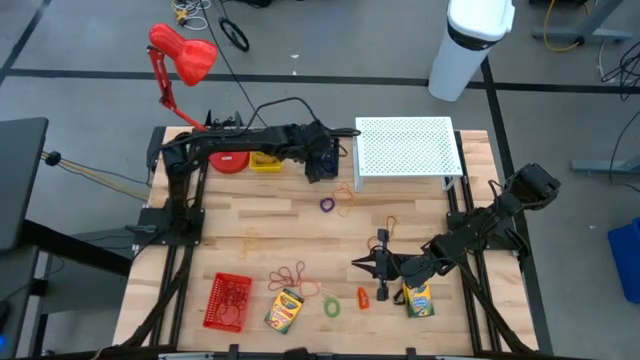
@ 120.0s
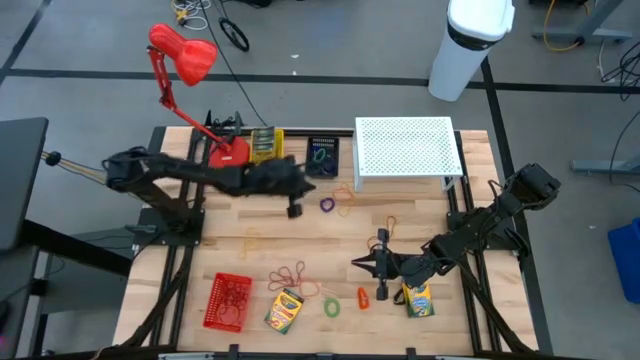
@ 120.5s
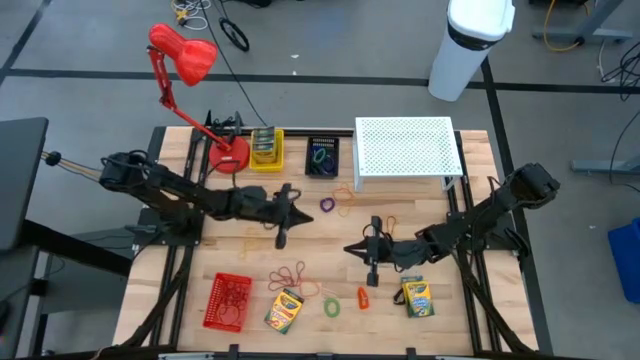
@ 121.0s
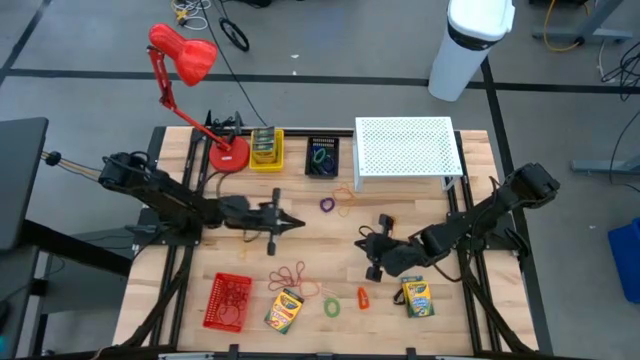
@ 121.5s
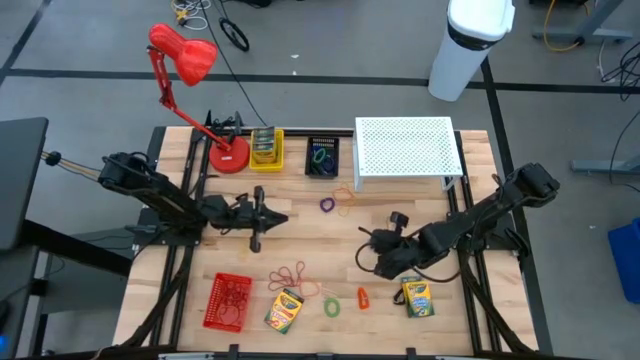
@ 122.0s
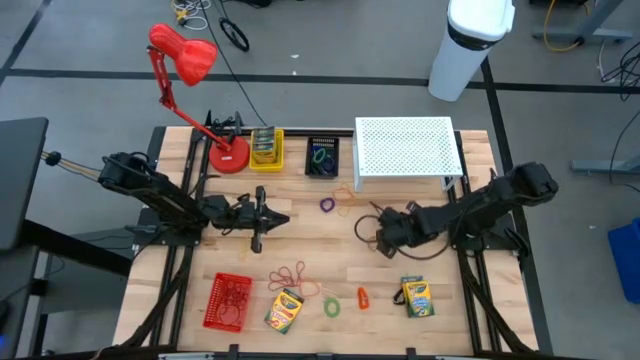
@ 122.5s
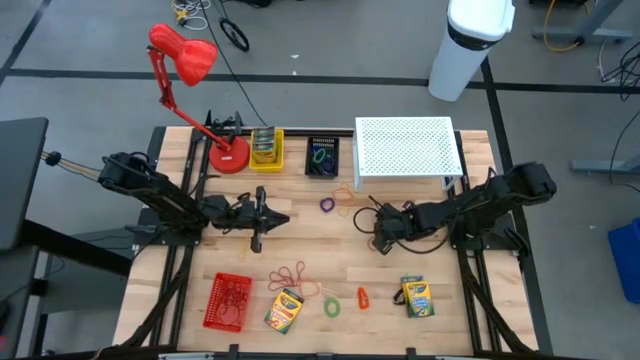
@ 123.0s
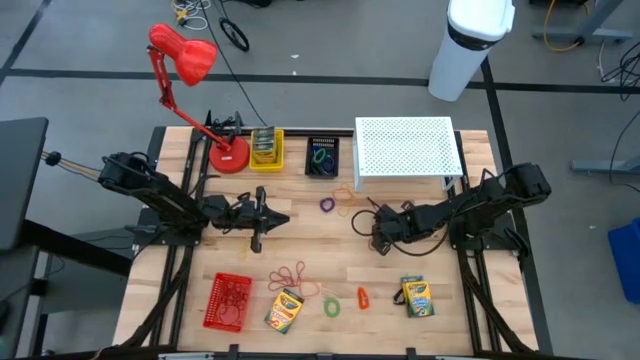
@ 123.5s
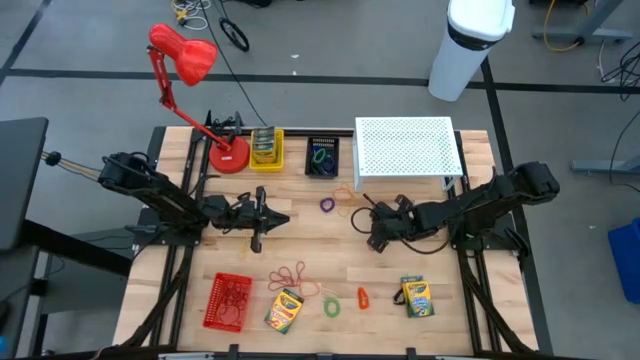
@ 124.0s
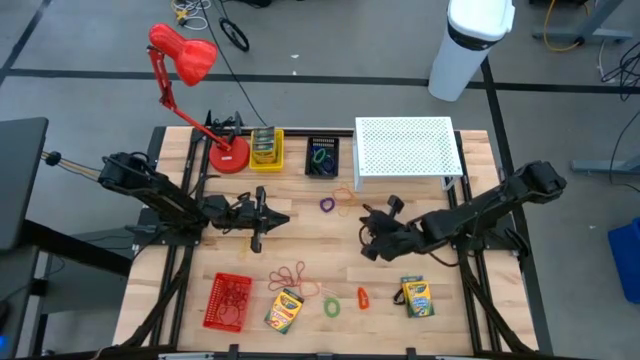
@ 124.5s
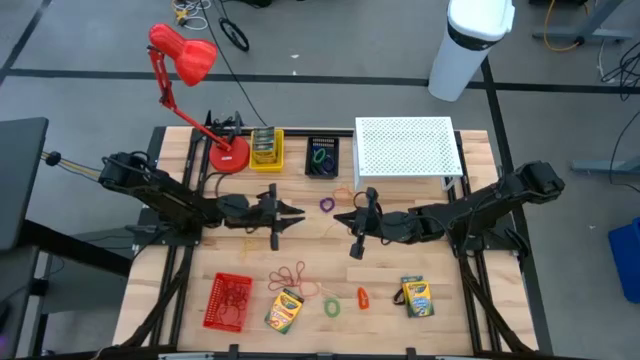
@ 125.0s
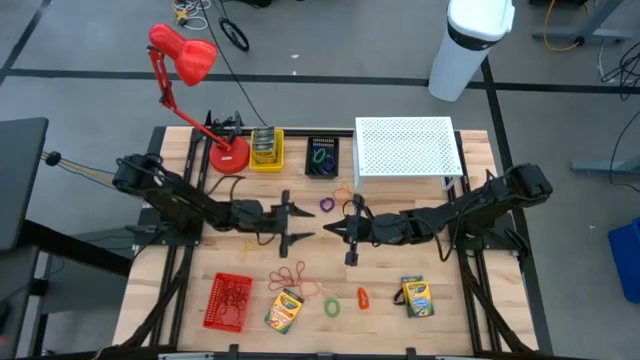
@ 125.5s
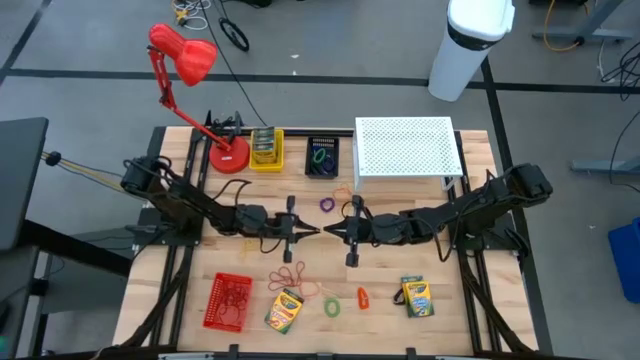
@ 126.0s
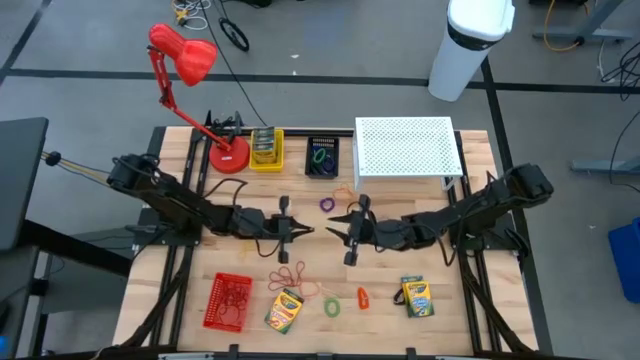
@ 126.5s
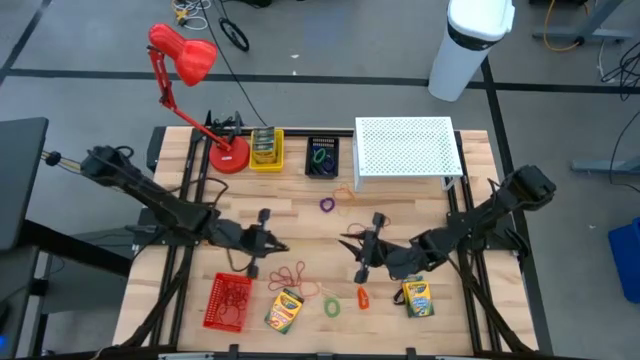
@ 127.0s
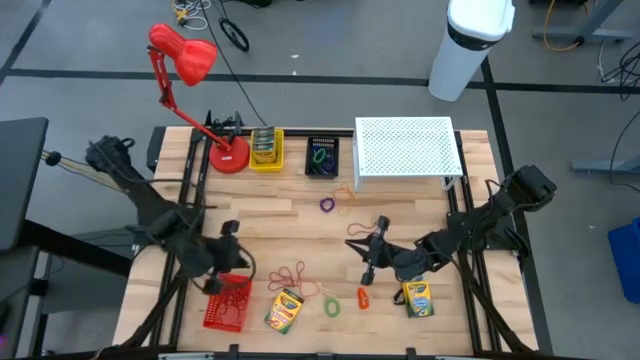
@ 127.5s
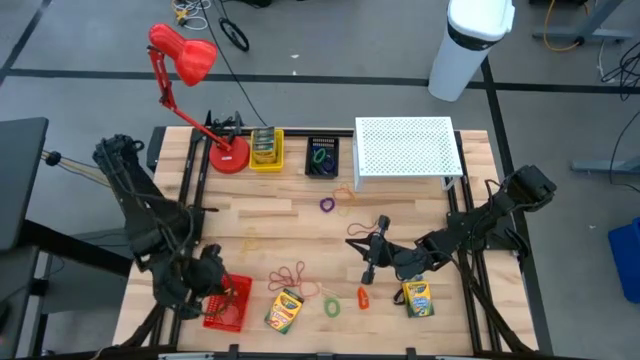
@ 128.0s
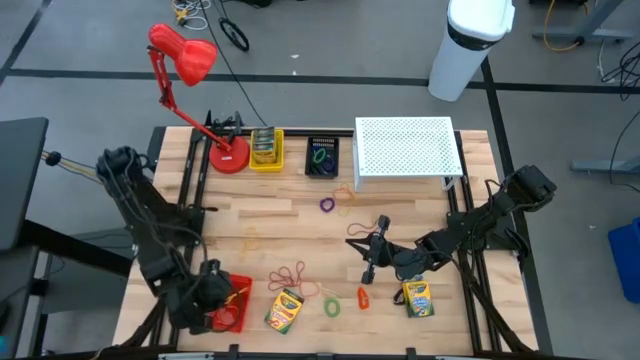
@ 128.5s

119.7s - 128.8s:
Task: Pick & Place Office Desk Supplies
Put the yellow rubber band into the red bin

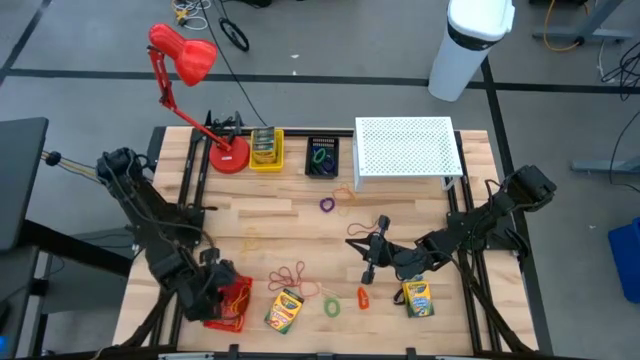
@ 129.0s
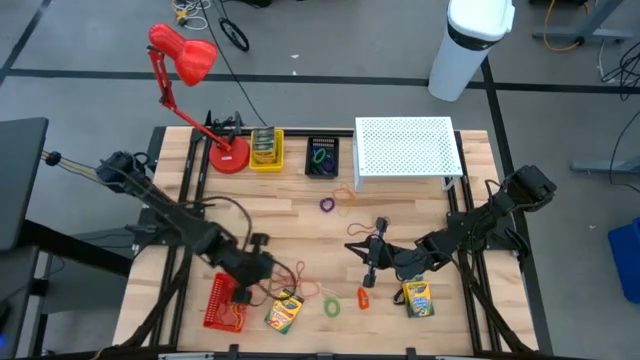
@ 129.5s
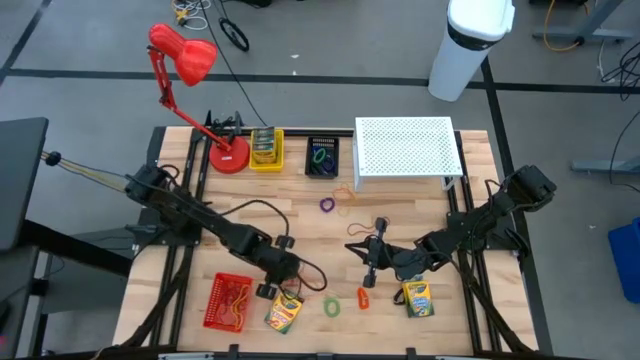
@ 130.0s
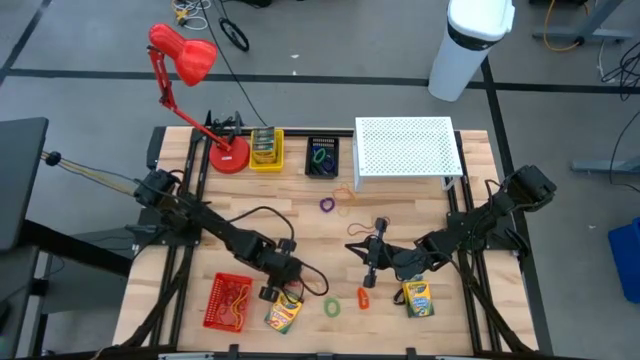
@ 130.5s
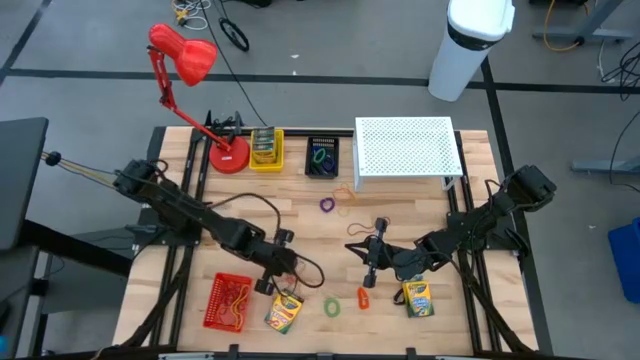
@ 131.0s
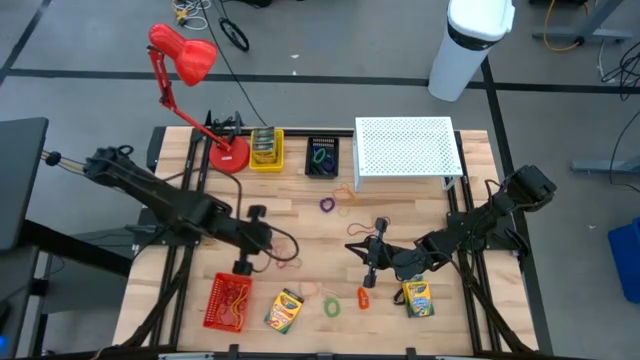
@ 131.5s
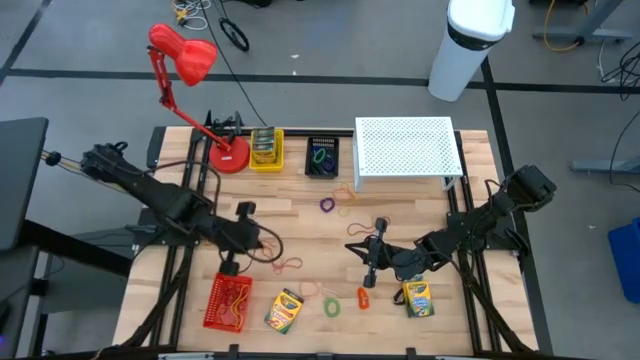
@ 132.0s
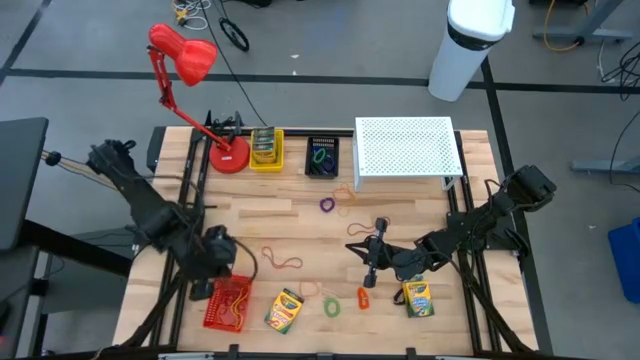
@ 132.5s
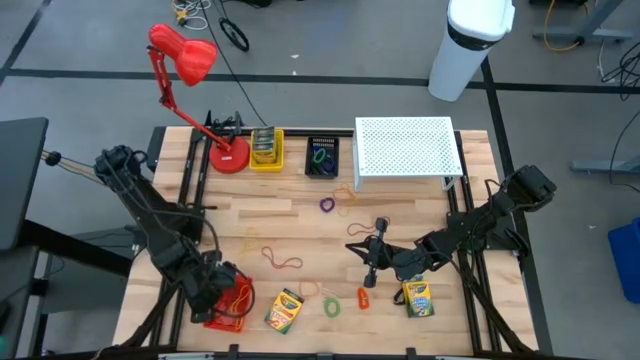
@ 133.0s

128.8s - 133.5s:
Put the red rubber band into the red bin

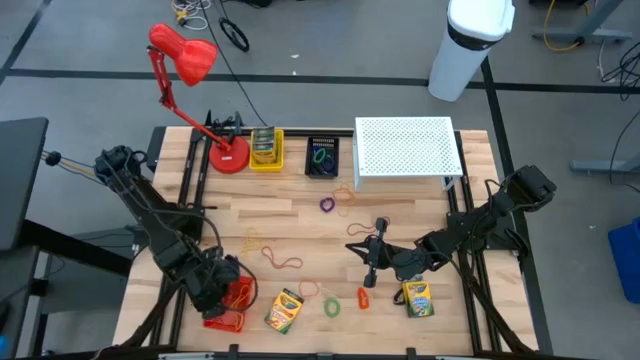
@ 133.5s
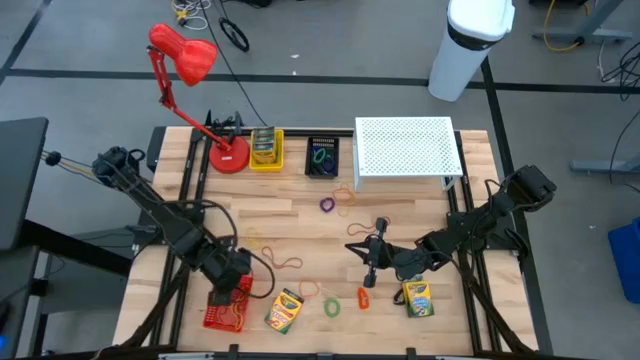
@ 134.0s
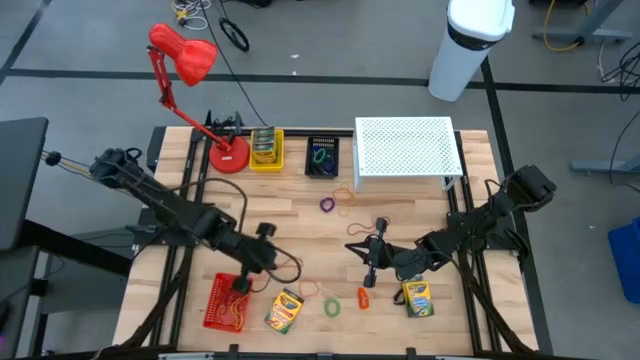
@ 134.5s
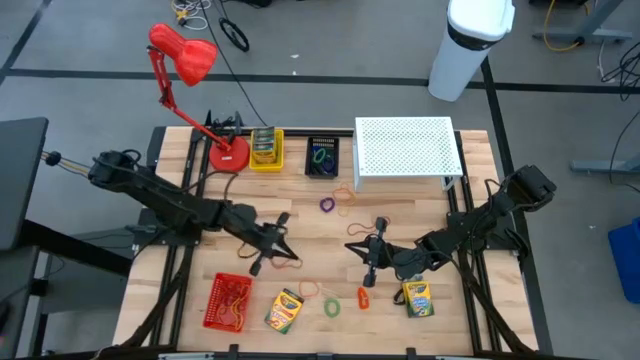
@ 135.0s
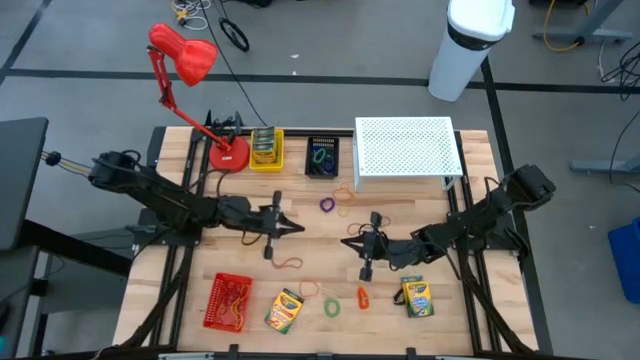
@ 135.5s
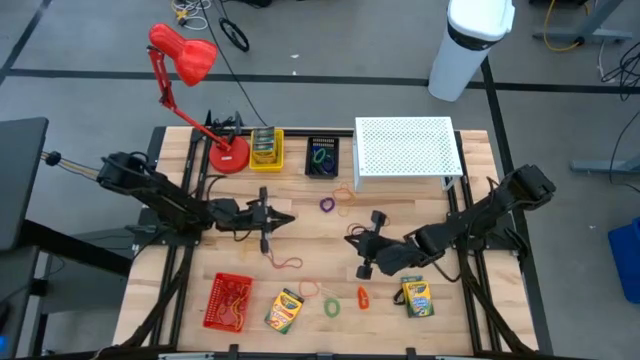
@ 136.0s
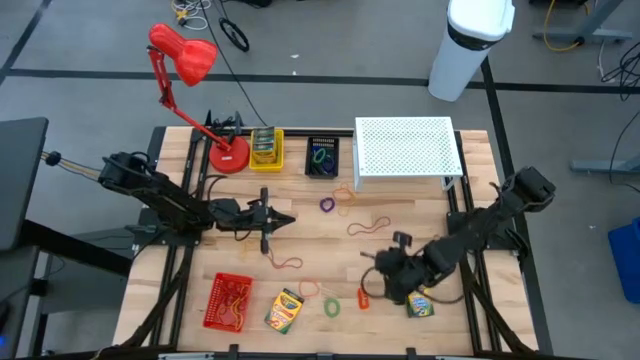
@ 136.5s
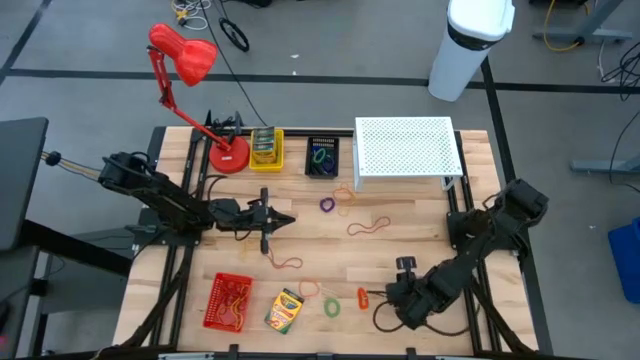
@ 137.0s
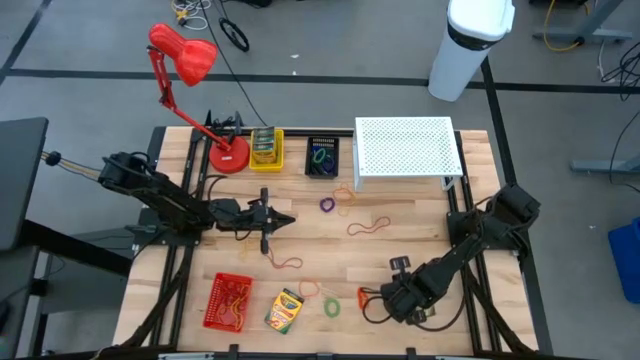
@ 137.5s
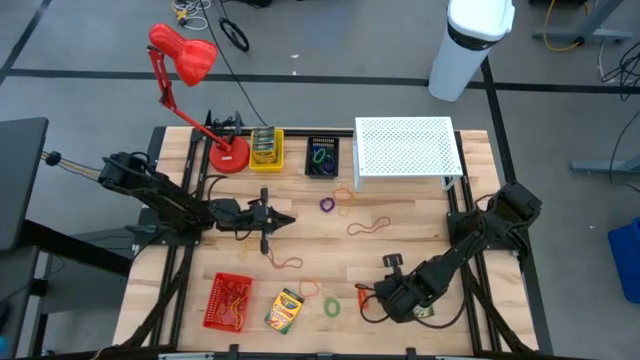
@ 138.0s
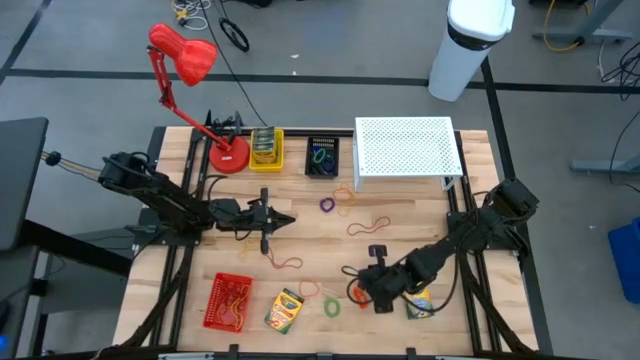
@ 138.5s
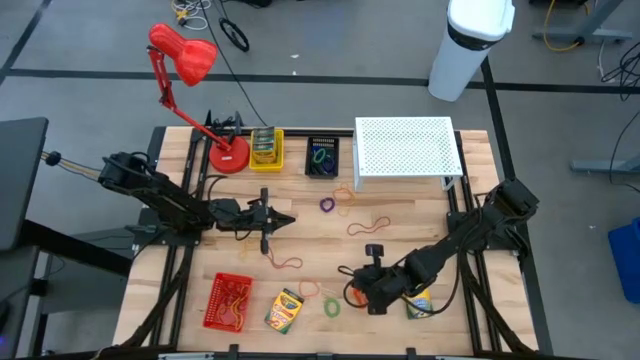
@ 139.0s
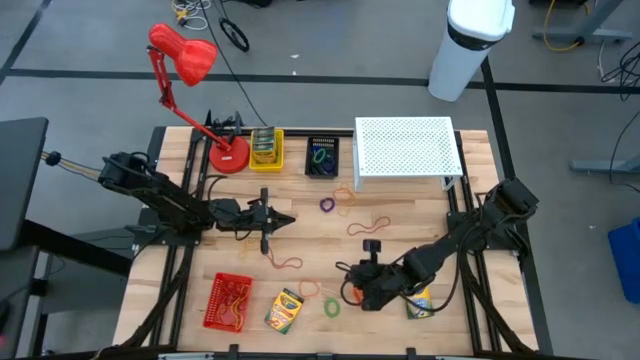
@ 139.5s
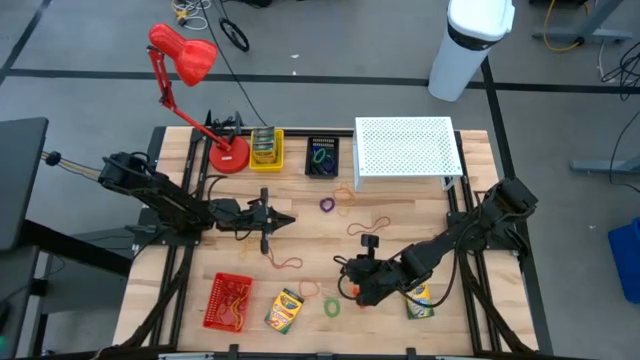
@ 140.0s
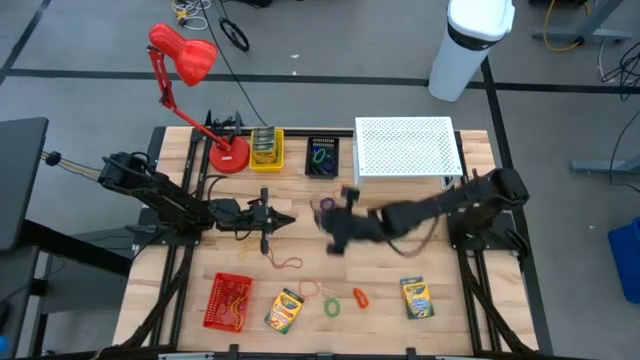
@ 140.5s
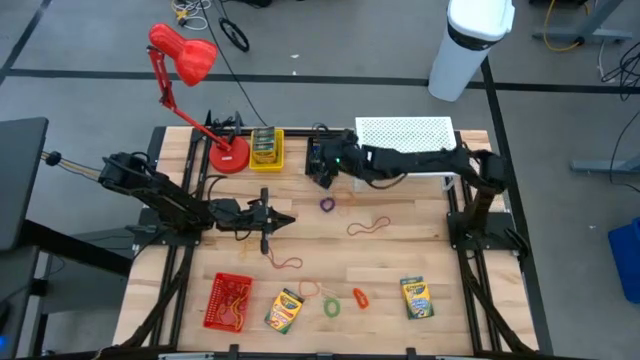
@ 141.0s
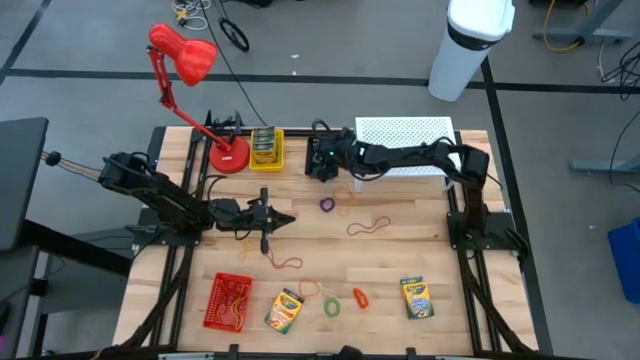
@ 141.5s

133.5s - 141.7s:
Put the black spiral keychain into the black bin
